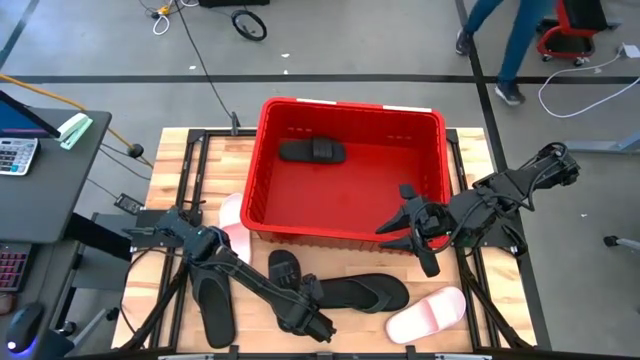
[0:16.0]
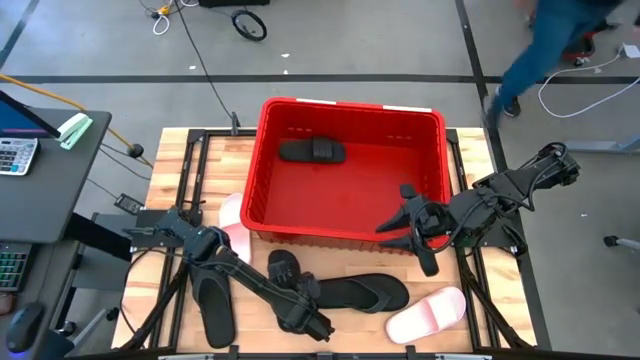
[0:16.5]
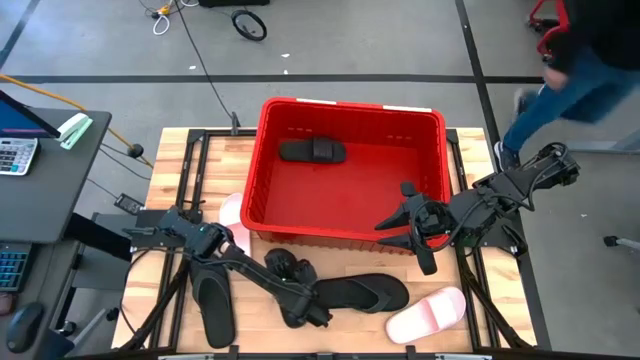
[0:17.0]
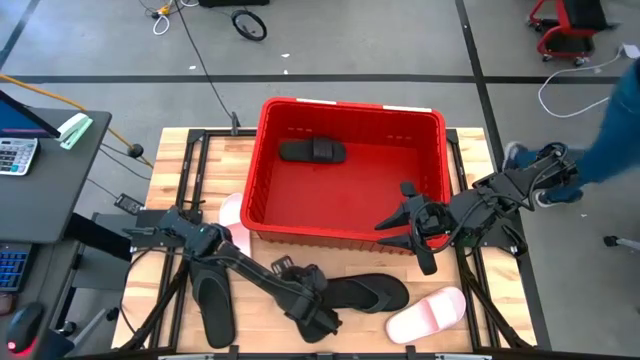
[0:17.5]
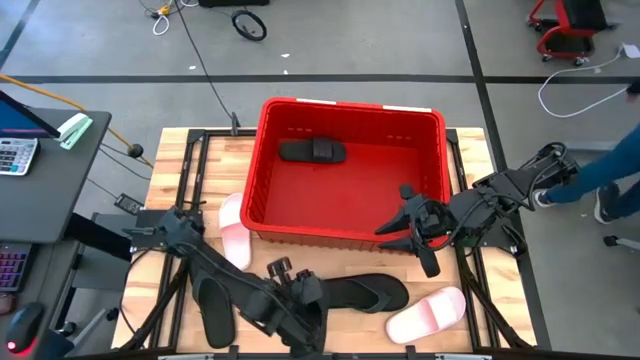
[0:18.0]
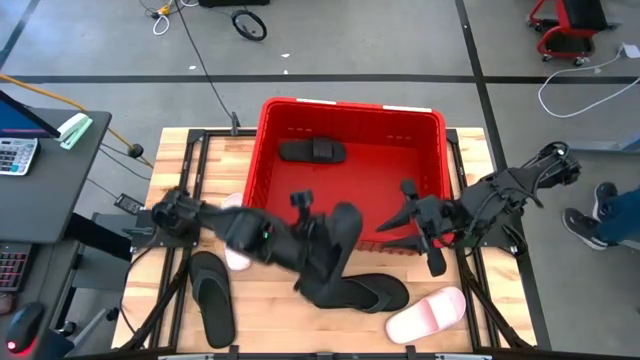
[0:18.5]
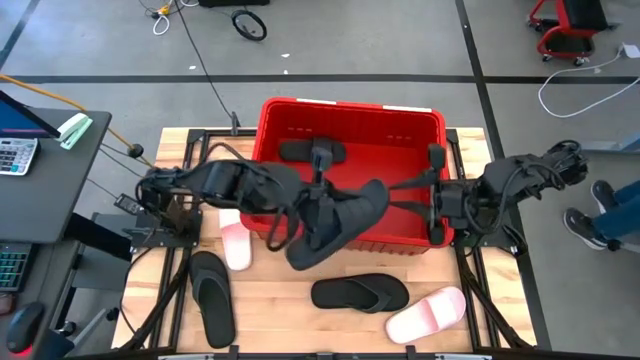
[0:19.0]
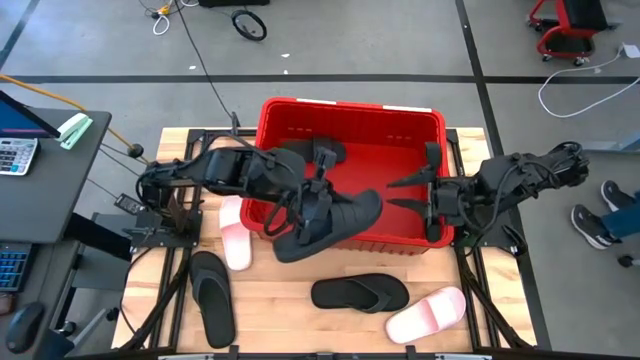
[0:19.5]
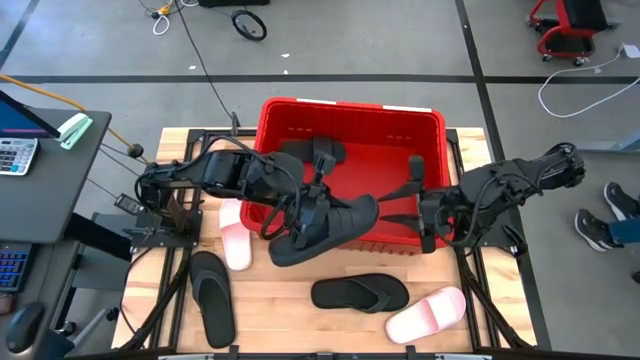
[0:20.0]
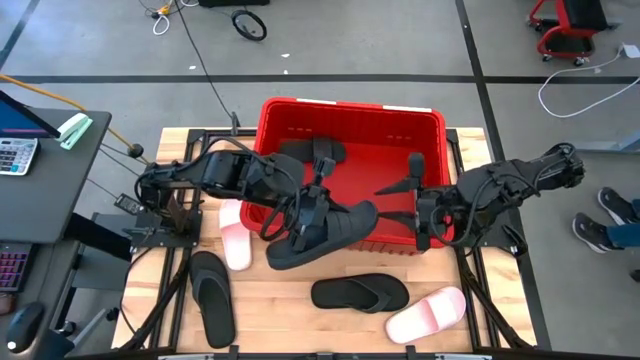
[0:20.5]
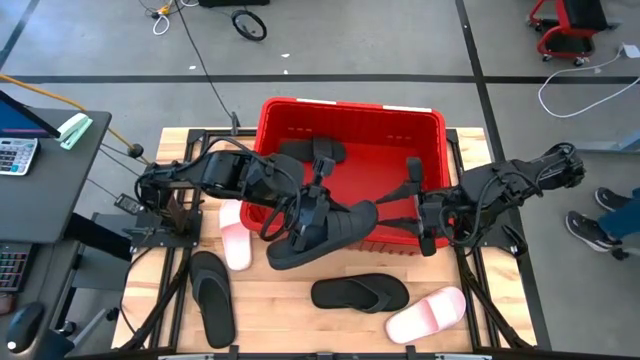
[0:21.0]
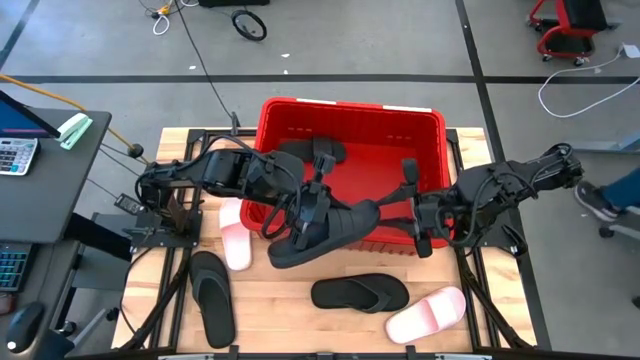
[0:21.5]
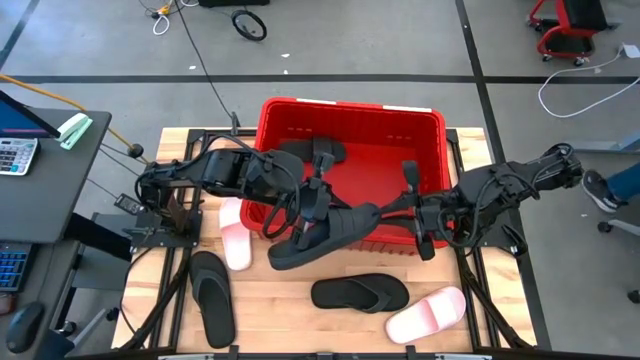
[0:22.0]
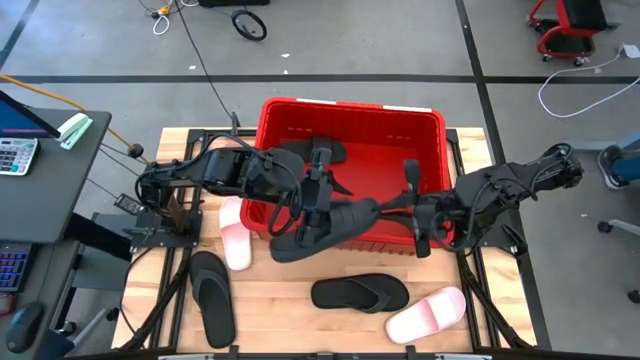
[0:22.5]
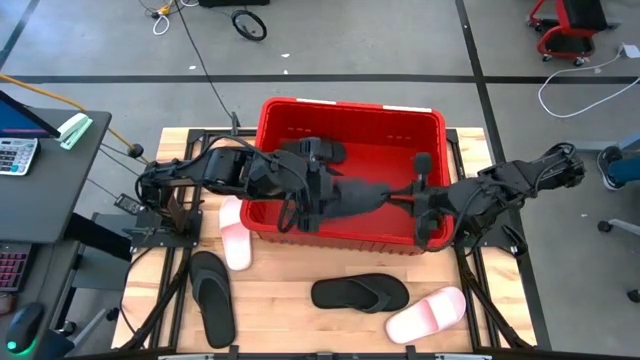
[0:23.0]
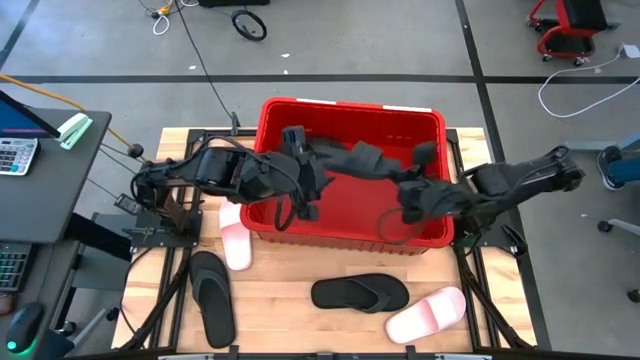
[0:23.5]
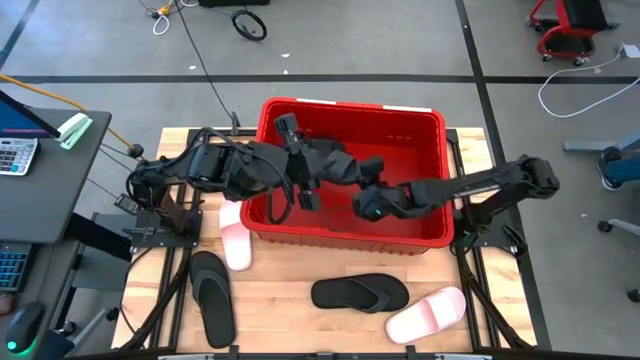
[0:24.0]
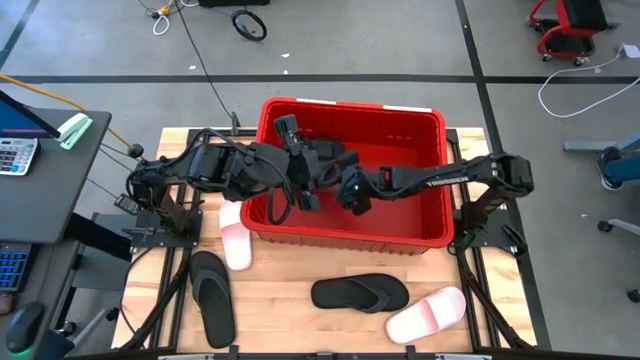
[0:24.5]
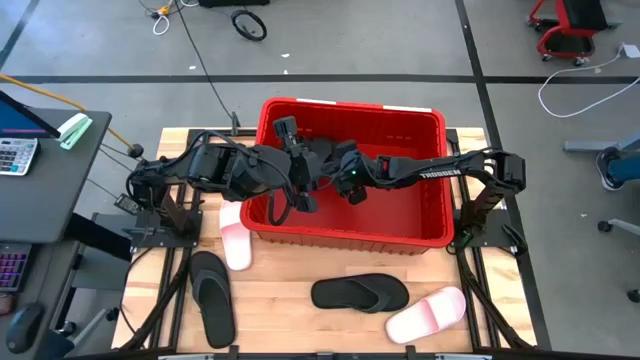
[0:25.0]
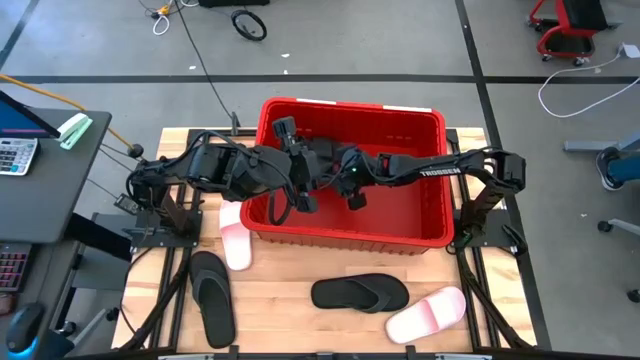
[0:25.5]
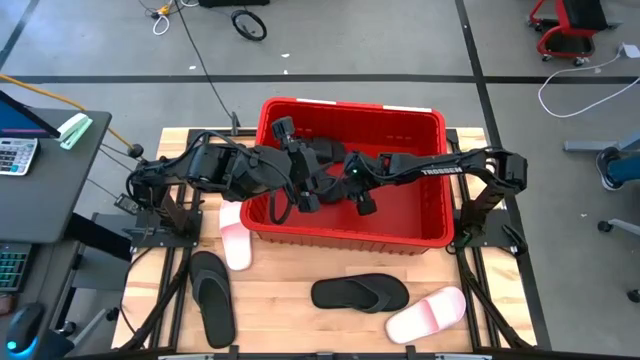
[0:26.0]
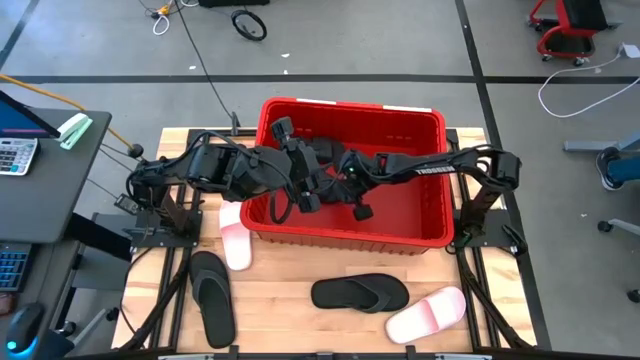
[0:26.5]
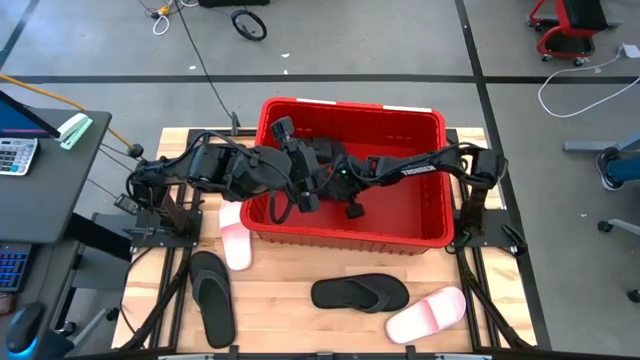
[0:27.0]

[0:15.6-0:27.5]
Task: Pick and place slides into bin
Put the black slide into the red bin

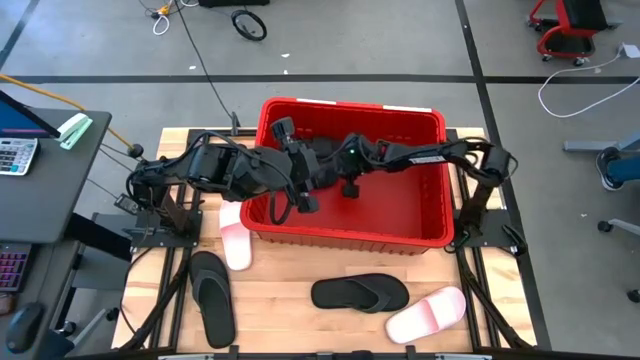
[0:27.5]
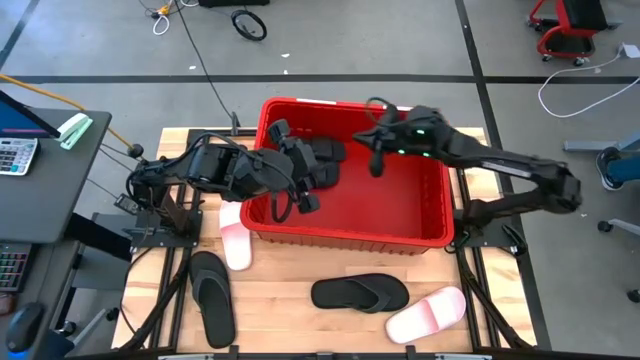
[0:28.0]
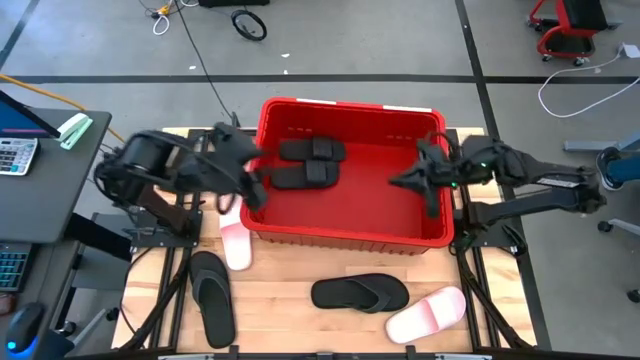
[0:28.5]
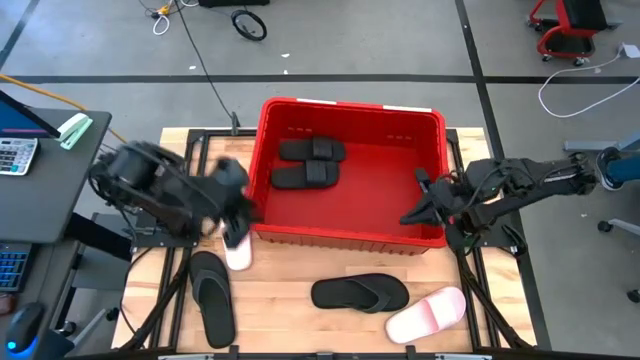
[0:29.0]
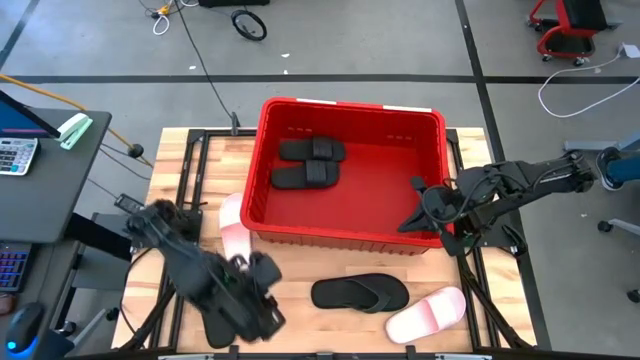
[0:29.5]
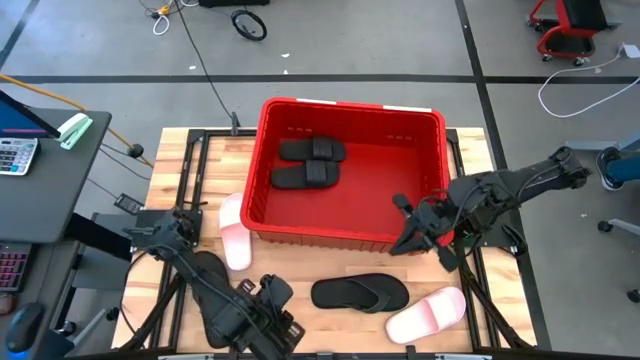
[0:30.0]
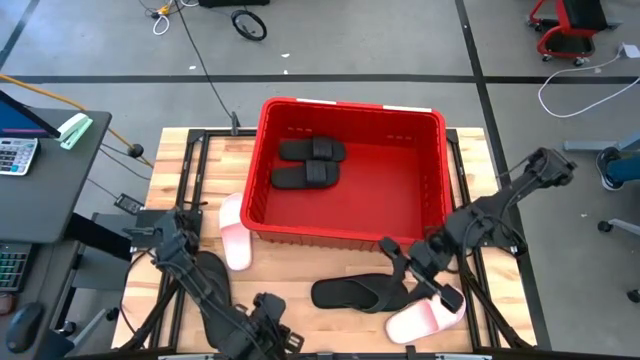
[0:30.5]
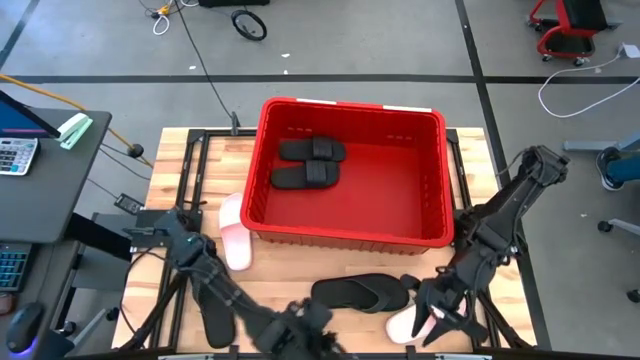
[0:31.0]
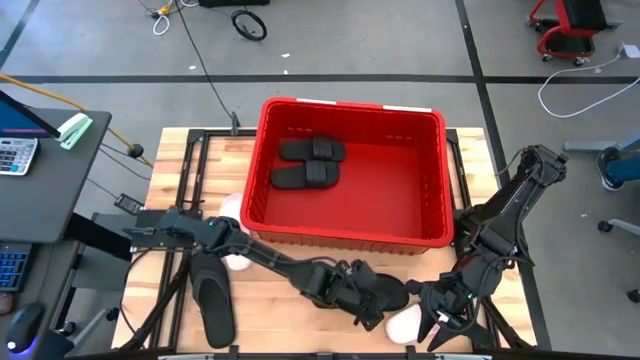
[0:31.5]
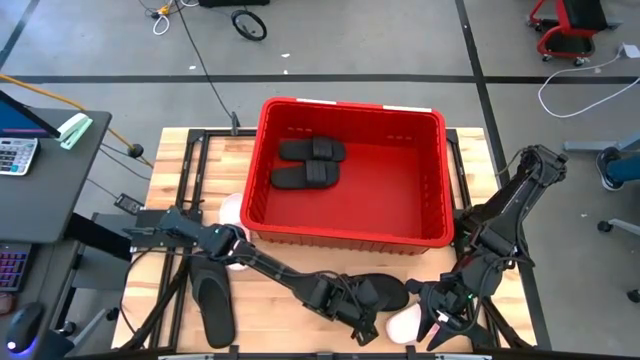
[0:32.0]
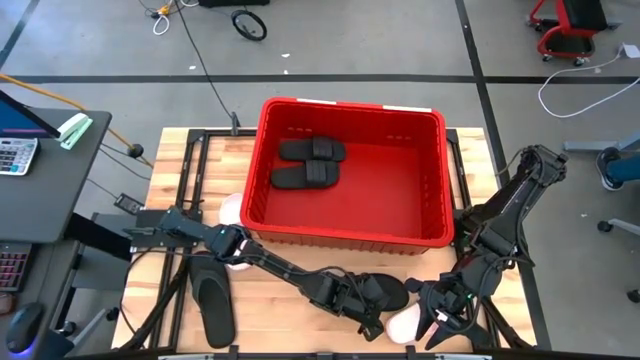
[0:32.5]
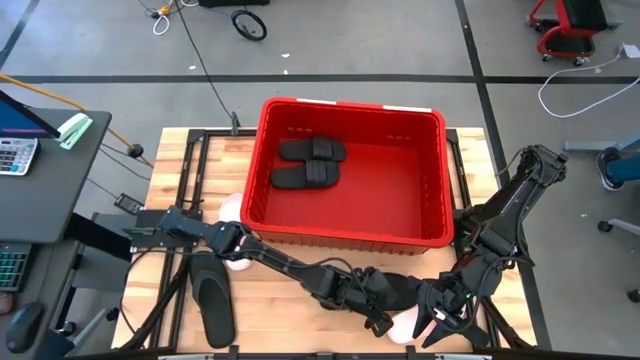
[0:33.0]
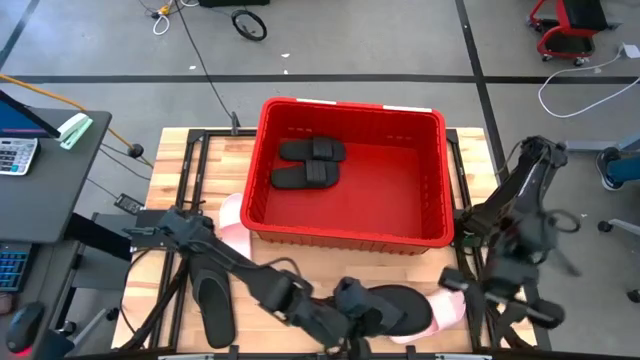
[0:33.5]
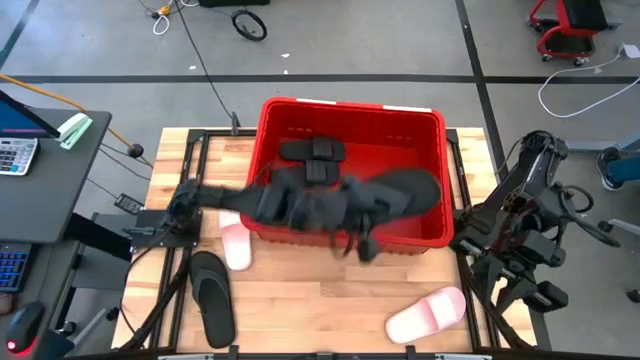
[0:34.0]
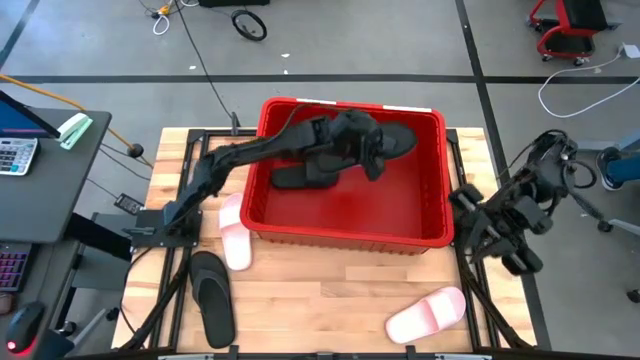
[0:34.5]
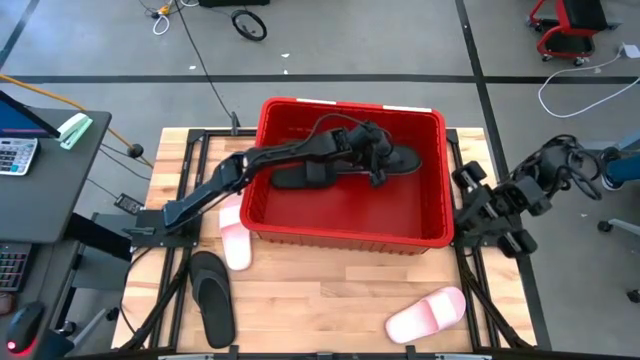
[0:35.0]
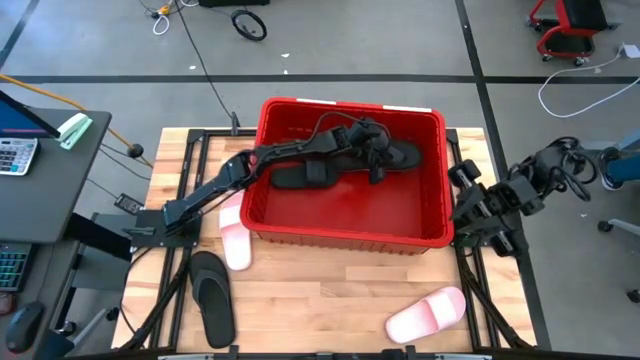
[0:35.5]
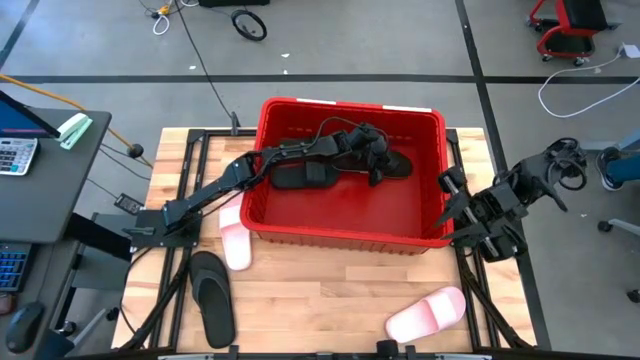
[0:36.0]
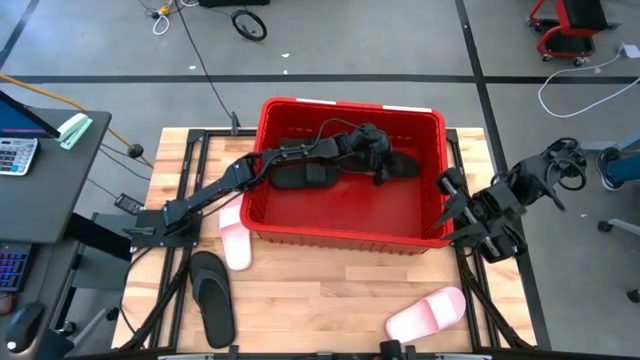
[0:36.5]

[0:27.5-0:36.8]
Put the right black slipper into the red bin
